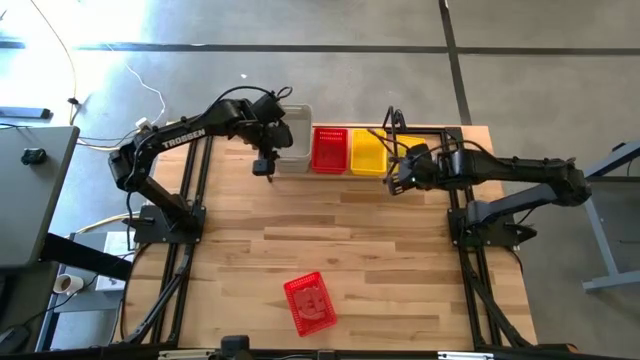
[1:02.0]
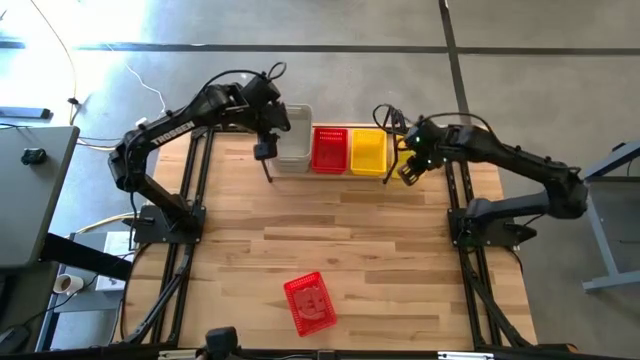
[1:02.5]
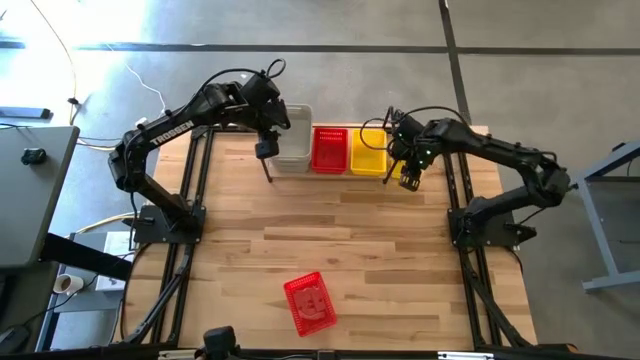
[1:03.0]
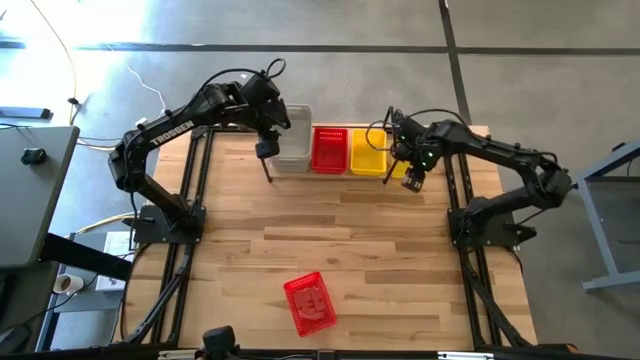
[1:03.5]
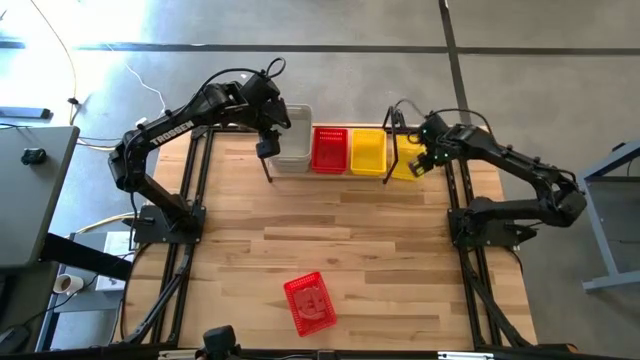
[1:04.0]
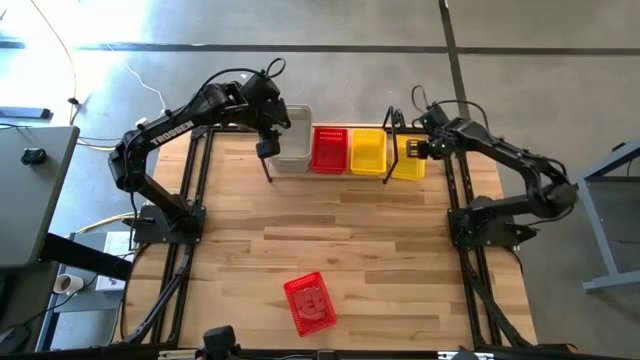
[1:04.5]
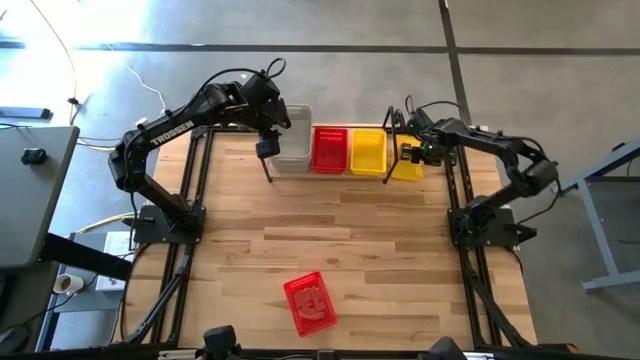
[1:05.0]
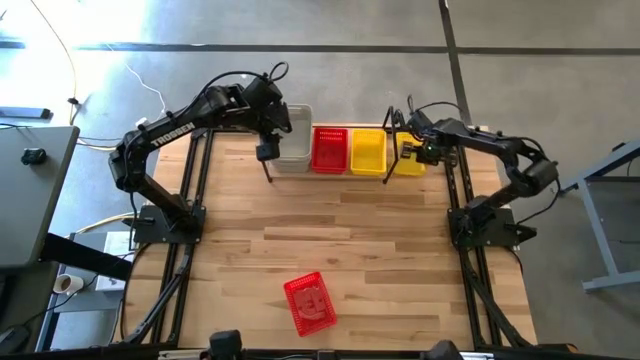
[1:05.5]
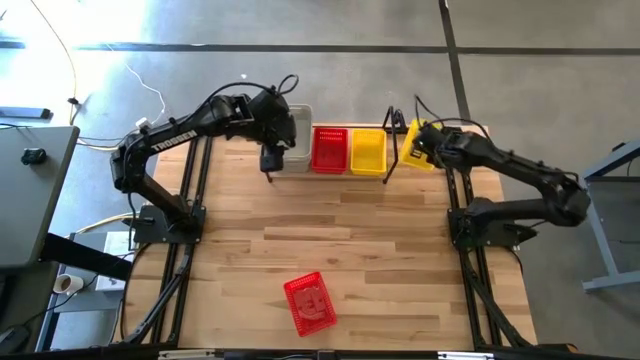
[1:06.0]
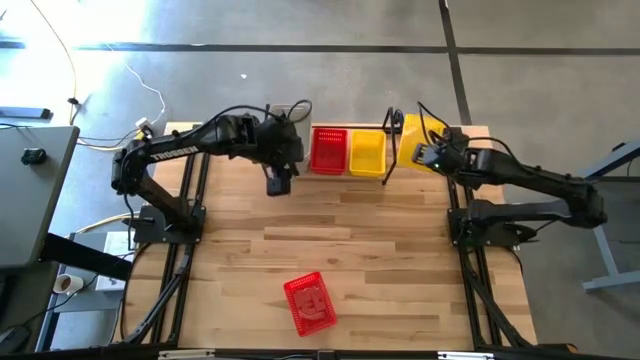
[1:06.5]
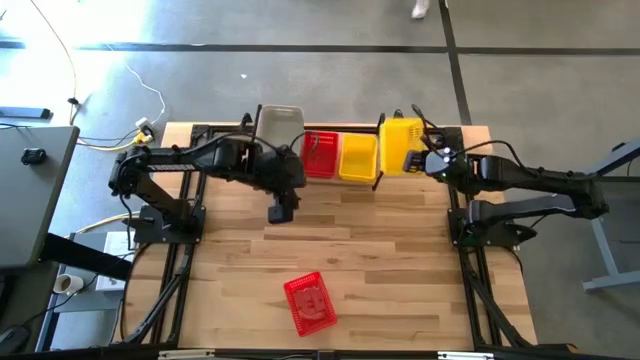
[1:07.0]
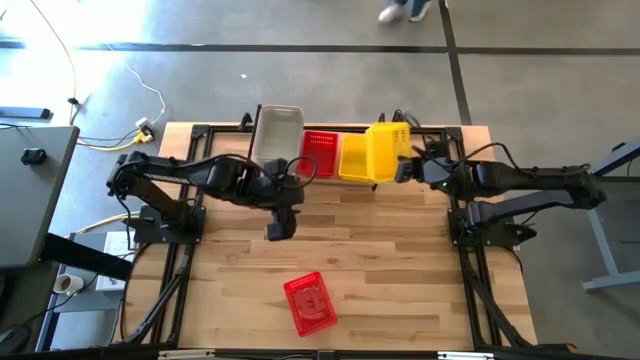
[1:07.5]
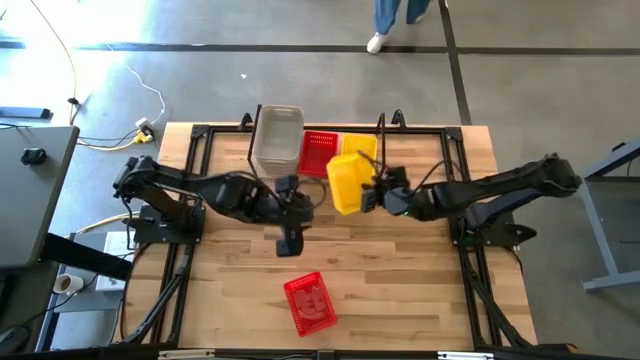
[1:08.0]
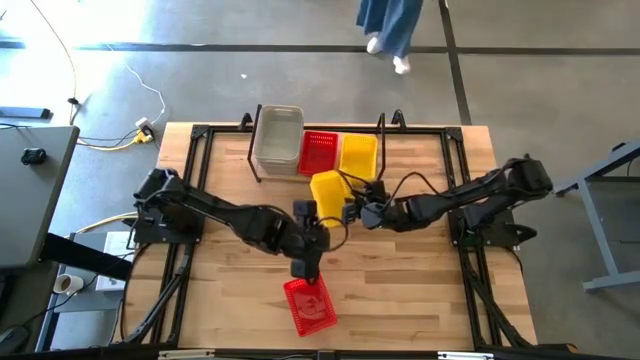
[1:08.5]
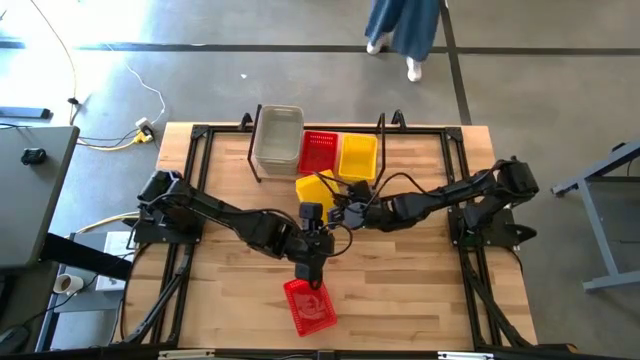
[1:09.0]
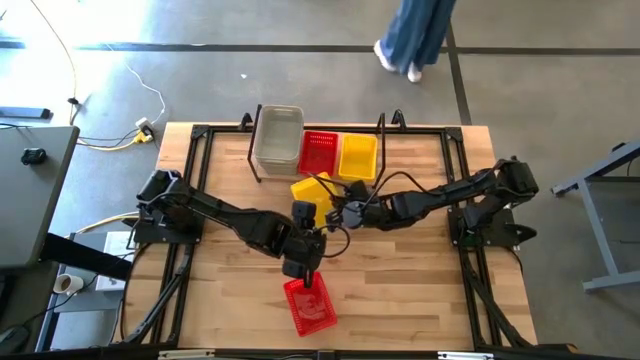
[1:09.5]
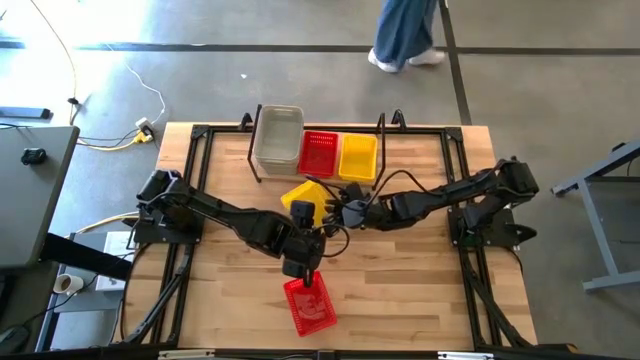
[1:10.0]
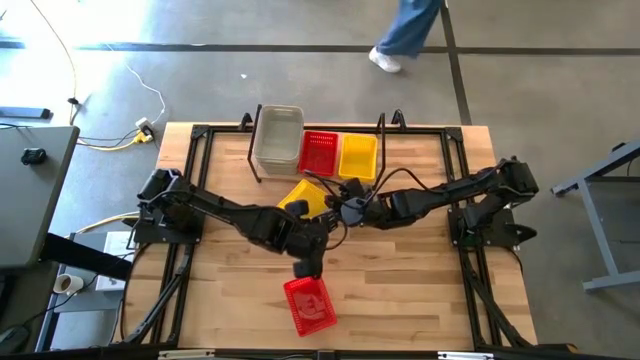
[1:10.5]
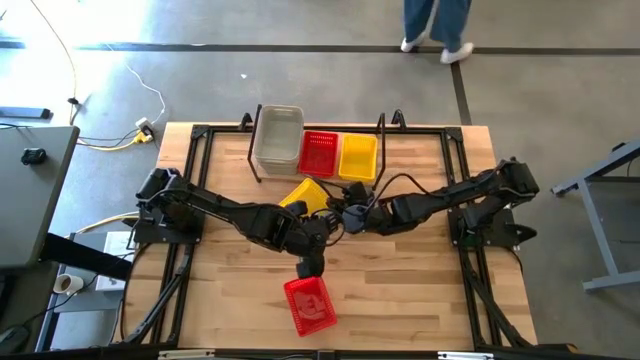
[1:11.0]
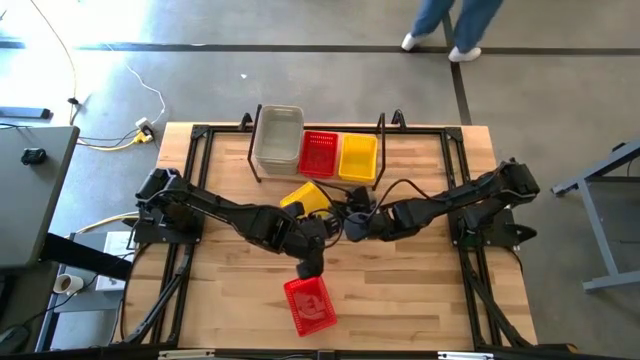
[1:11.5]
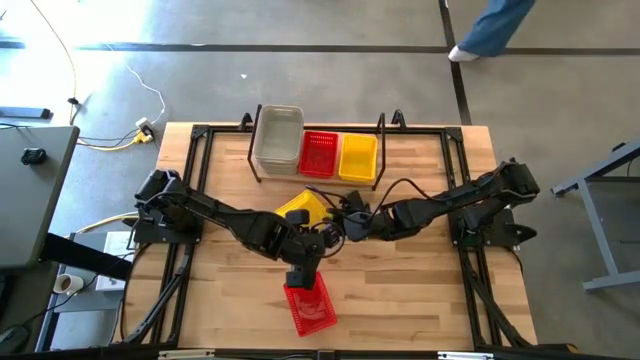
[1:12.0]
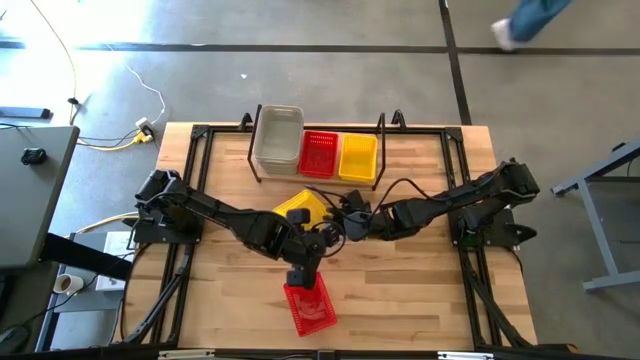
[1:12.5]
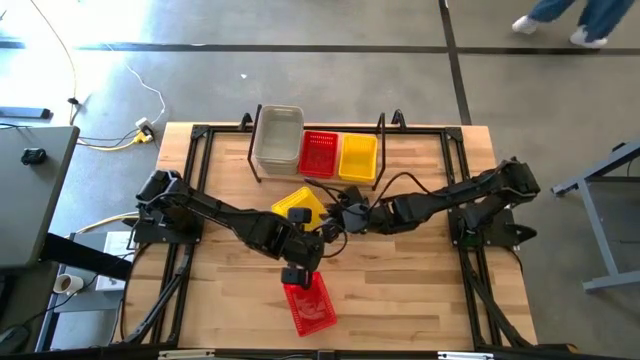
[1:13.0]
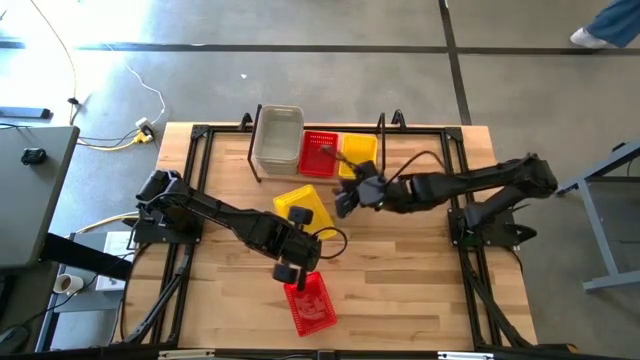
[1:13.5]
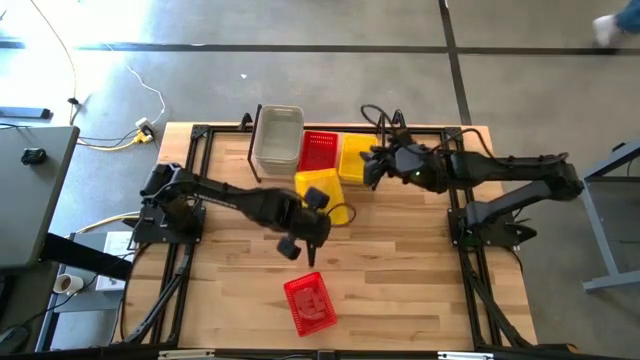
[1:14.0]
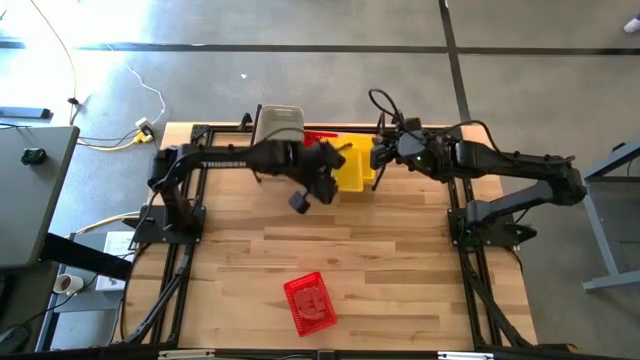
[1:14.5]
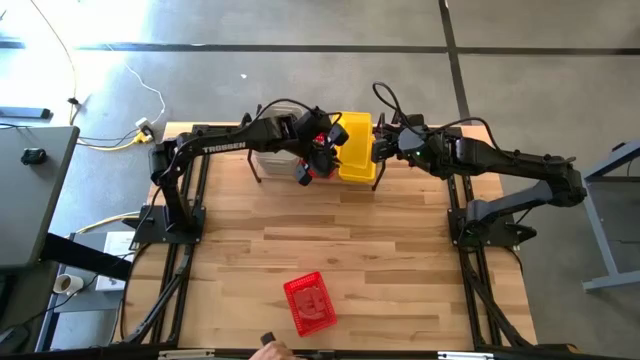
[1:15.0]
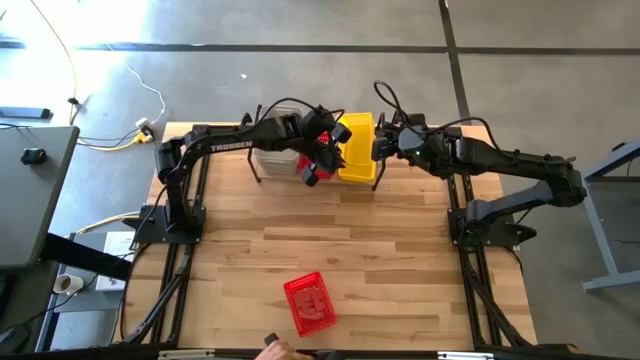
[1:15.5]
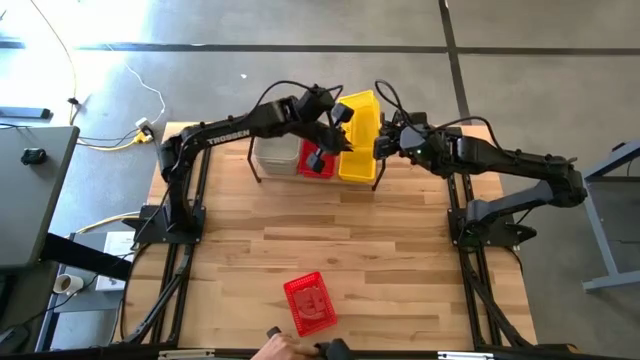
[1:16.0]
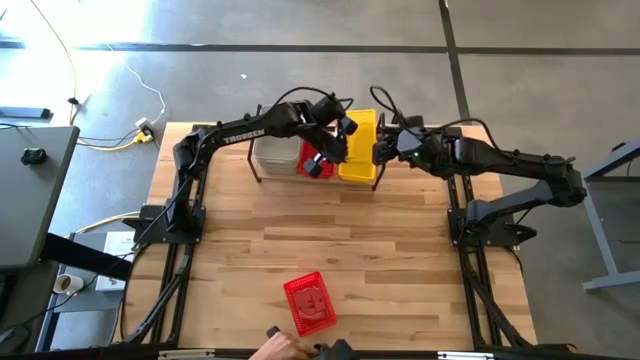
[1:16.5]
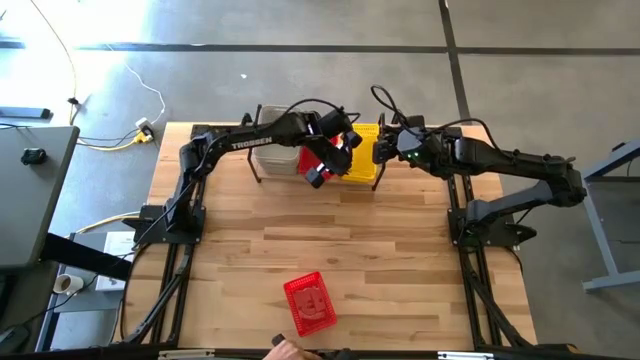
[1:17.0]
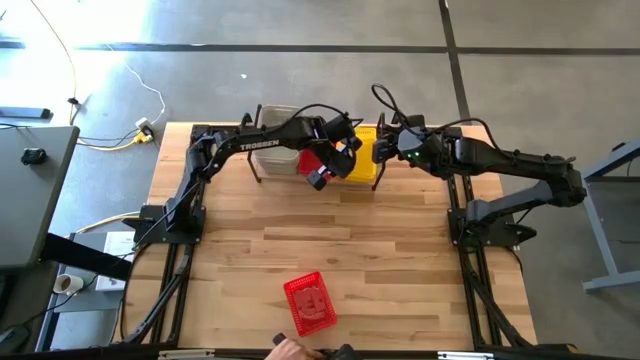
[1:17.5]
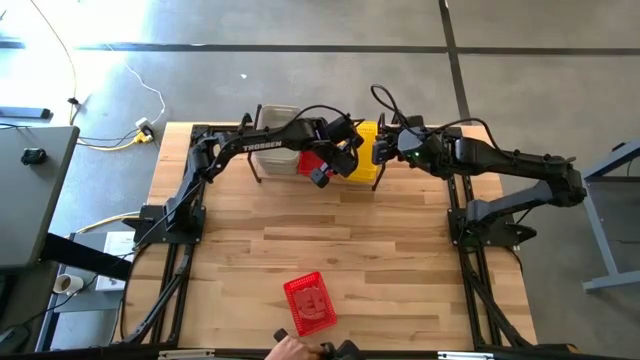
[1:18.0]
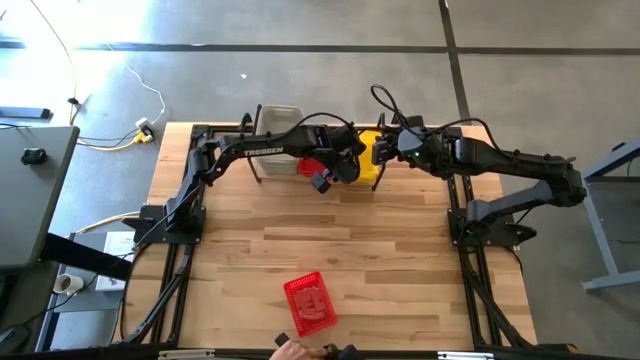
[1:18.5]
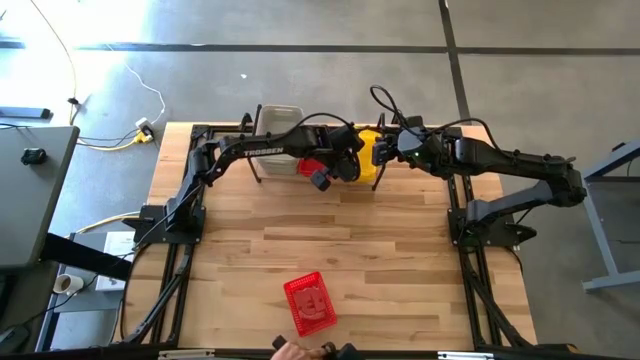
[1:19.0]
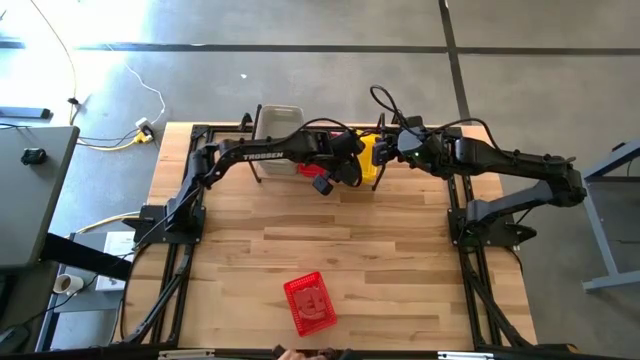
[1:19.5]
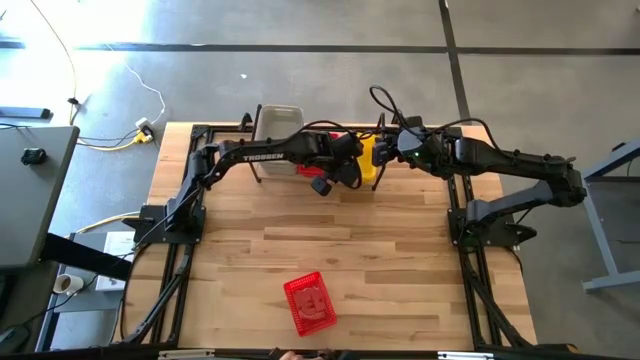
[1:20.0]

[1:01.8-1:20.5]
Task: Stack baskets on shelf by color
Stack the yellow bin on top of the yellow bin

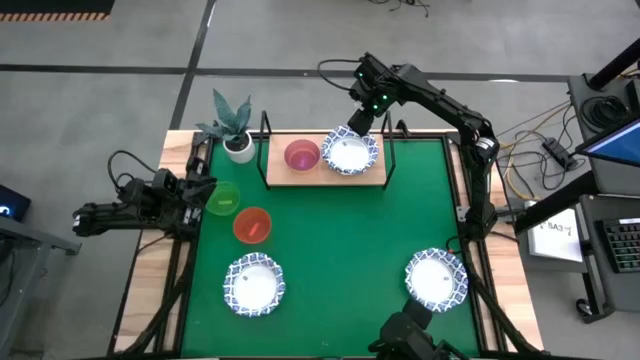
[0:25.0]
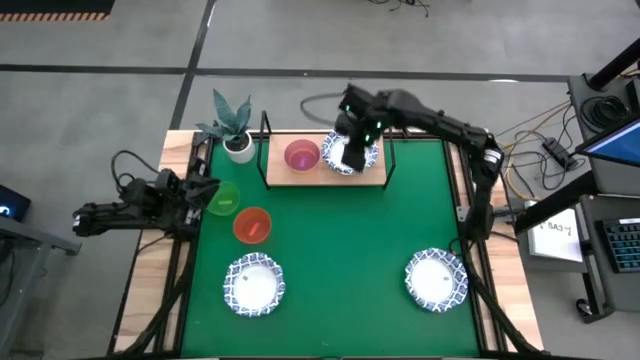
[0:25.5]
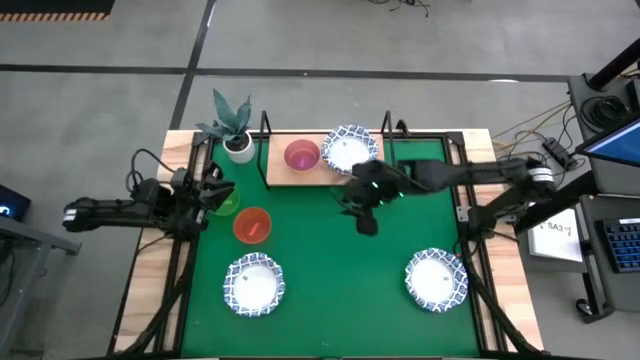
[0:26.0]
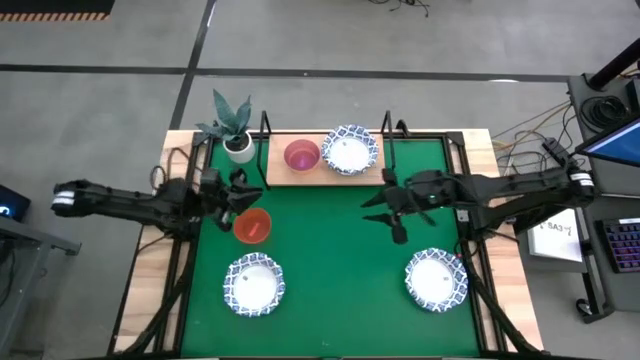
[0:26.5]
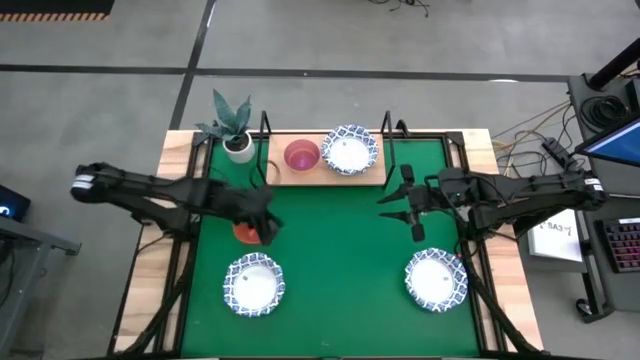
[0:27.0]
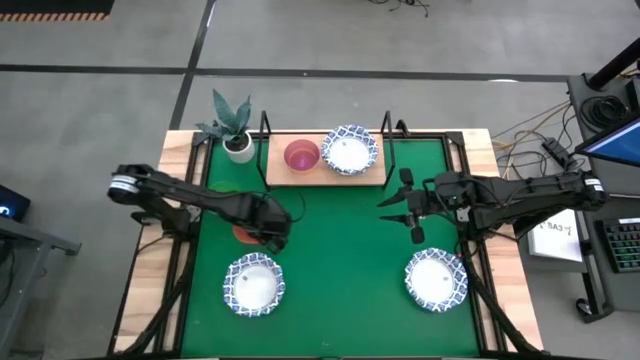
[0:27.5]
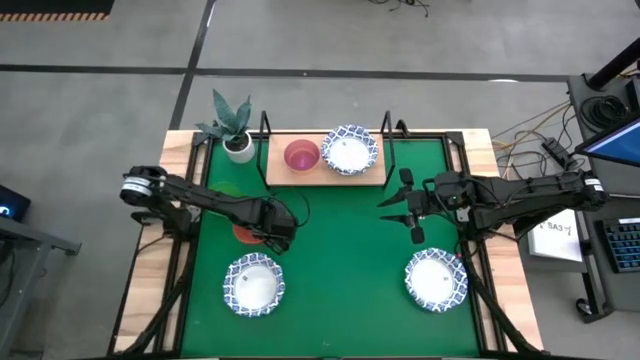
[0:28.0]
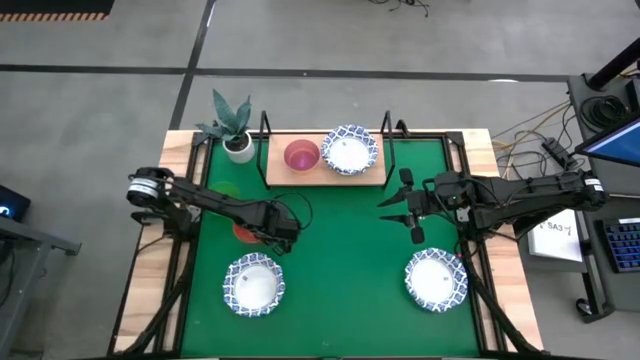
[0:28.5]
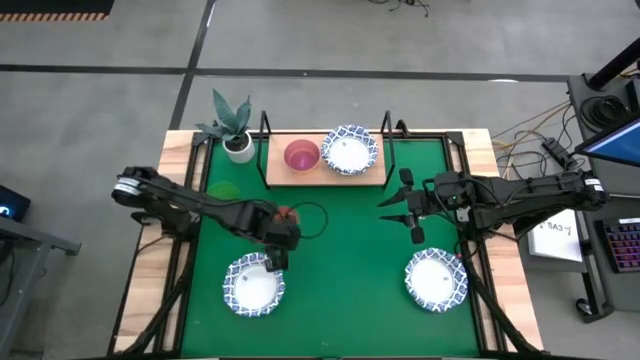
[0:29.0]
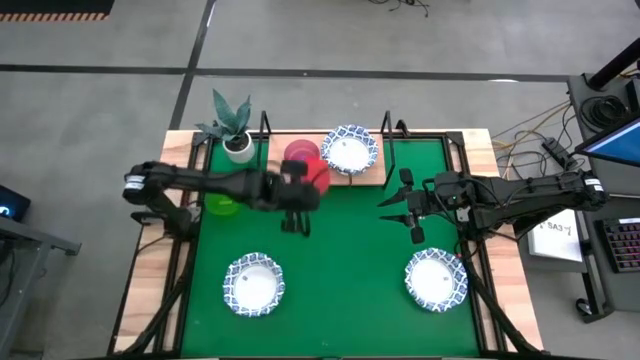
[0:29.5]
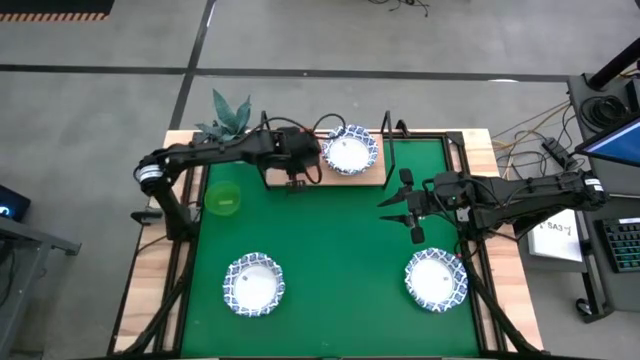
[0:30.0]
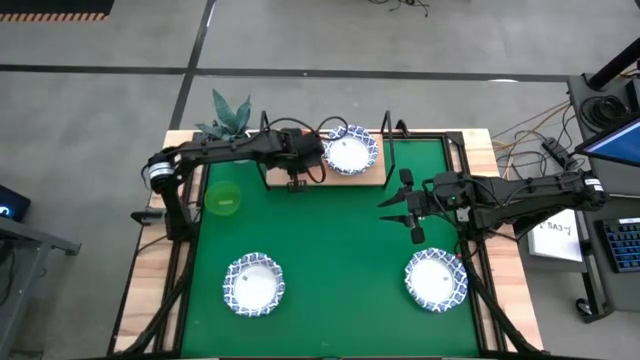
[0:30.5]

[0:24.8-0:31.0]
Task: Place and stack bowls onto a shelf
Stack the transparent orange bowl on top of the transparent violet bowl on the shelf
